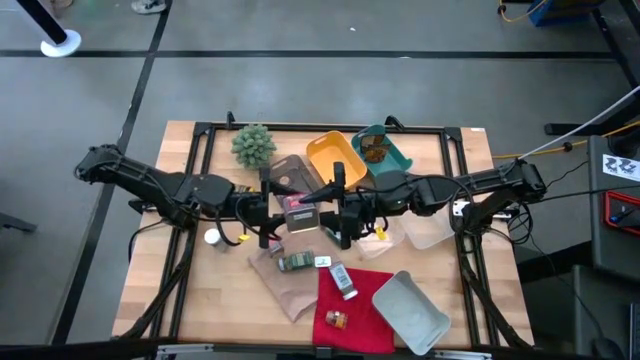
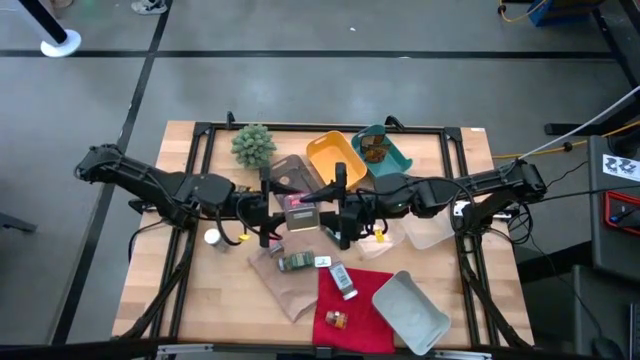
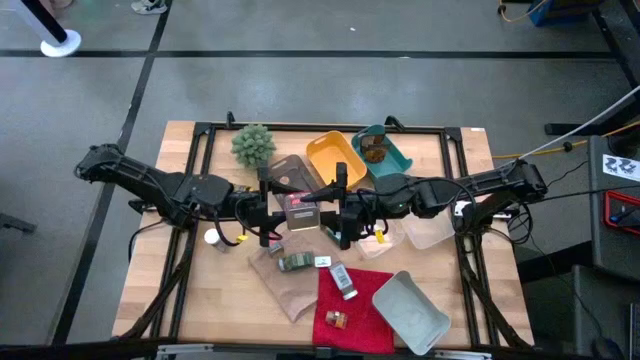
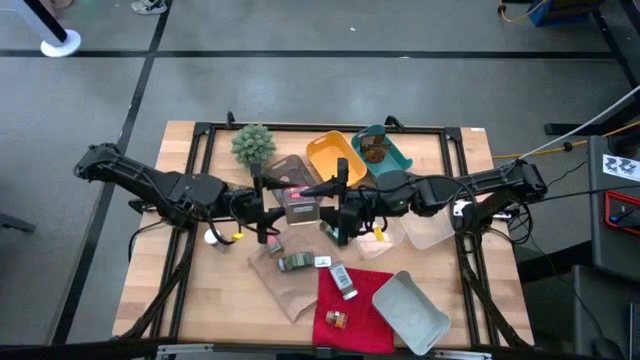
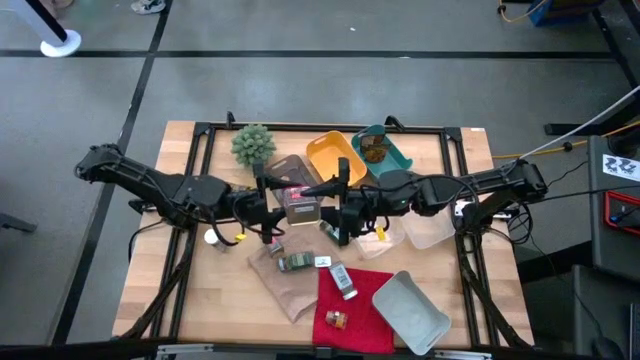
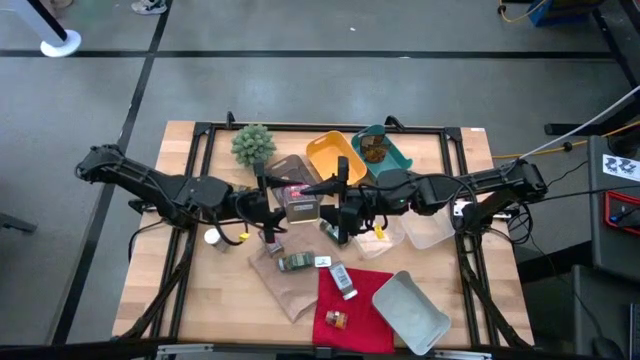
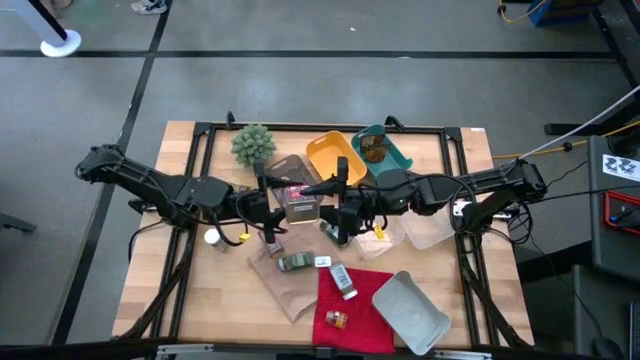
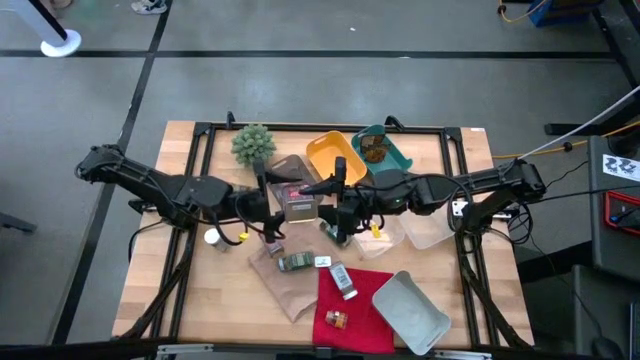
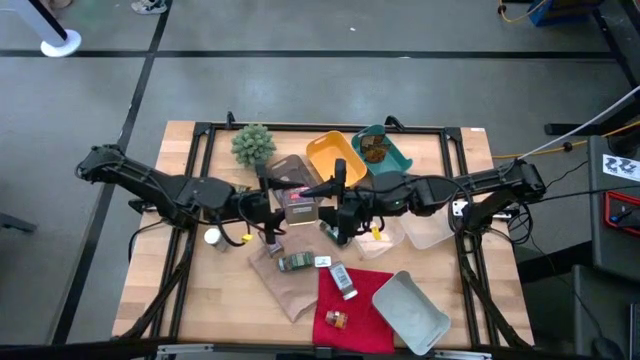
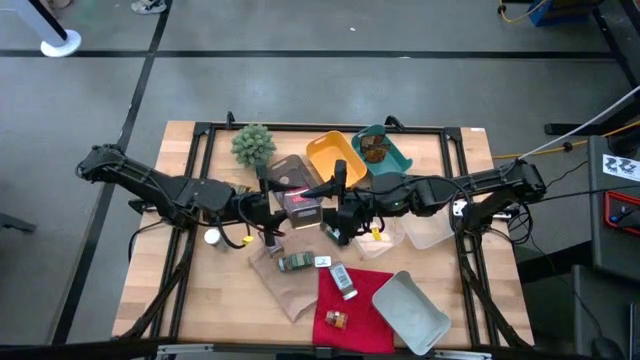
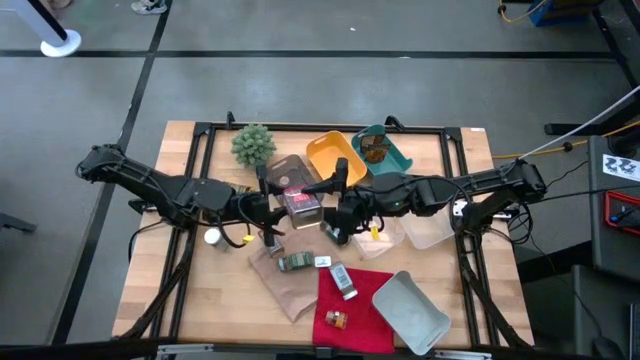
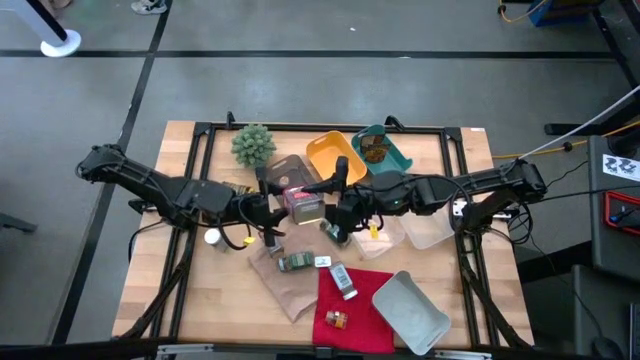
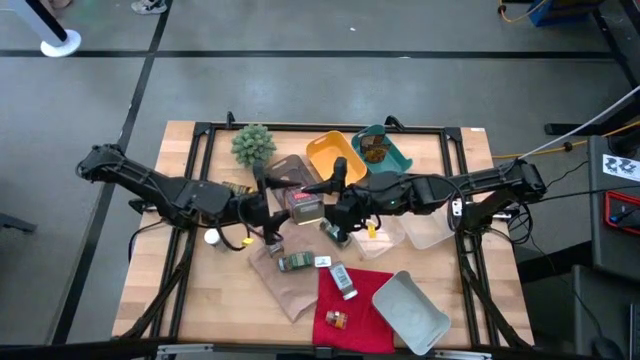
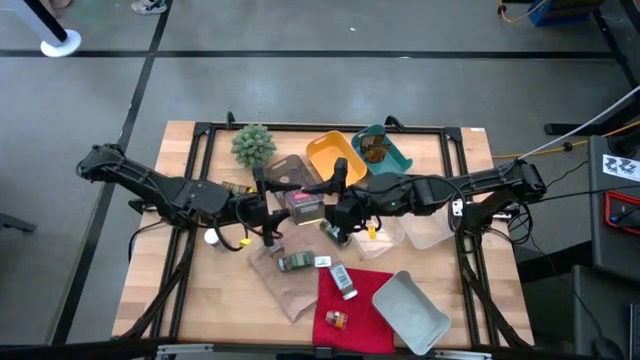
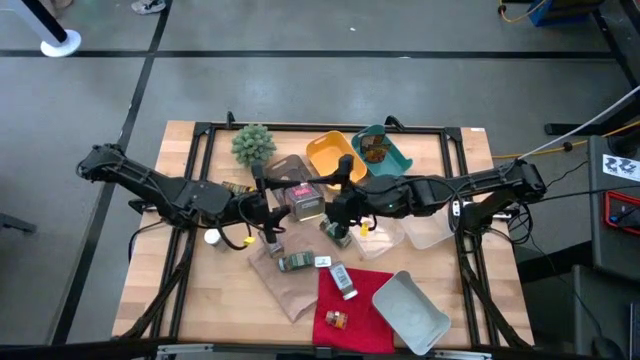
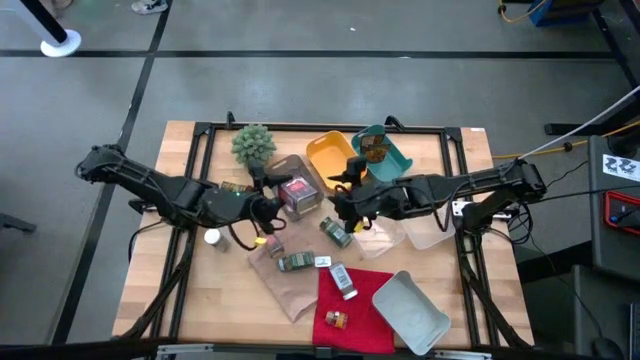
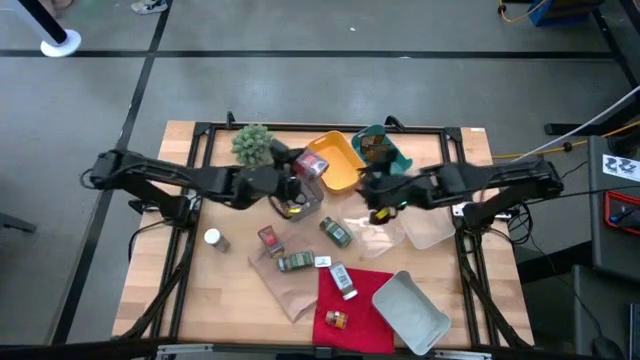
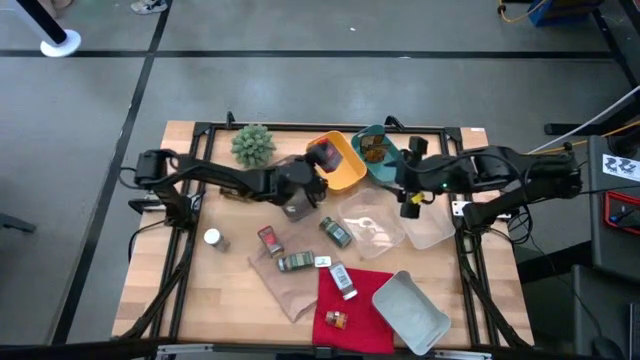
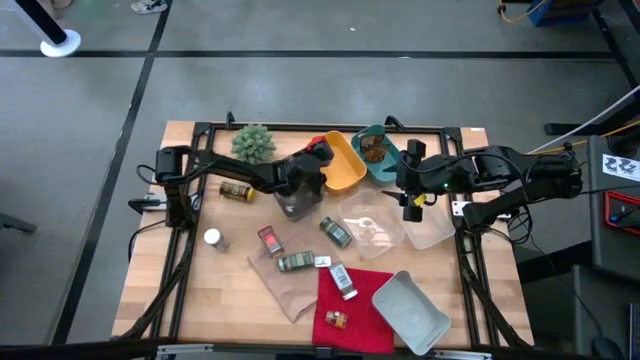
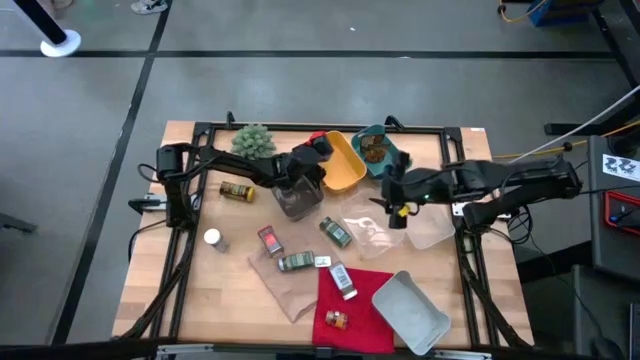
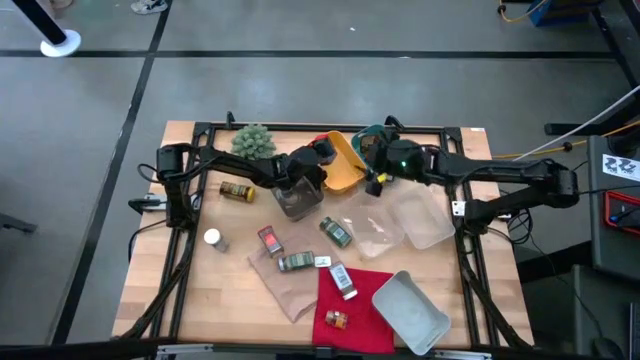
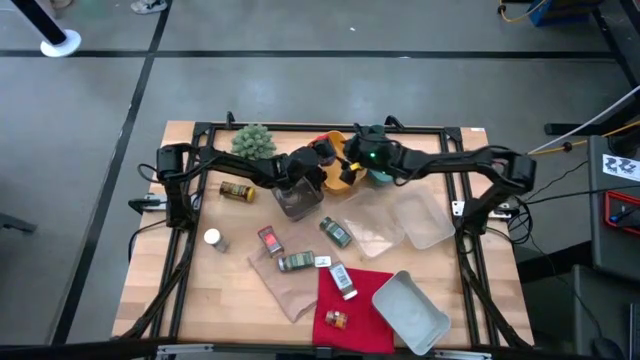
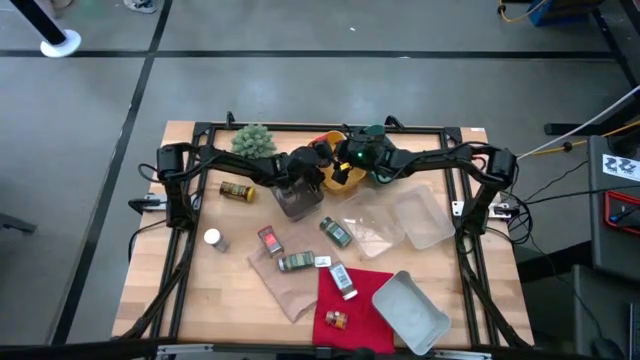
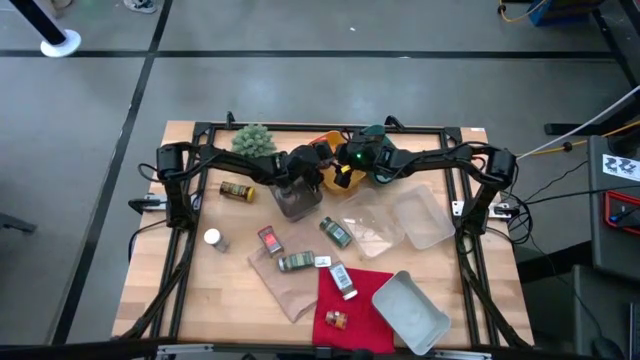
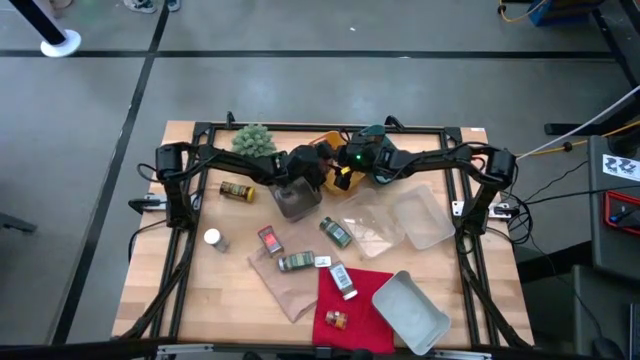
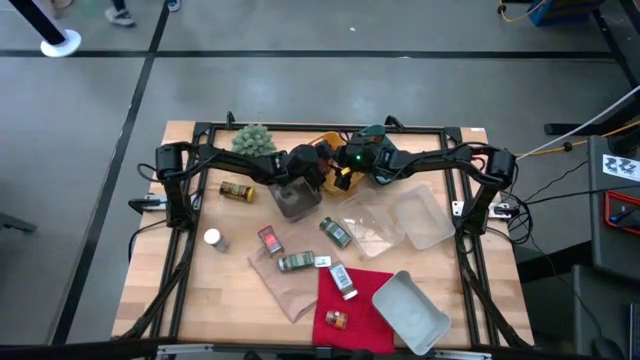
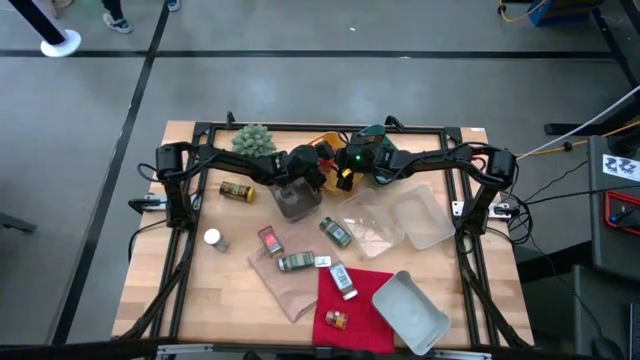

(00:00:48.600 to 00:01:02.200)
Task: Sort spices by type
Put the right red seasoning can into the yellow bin

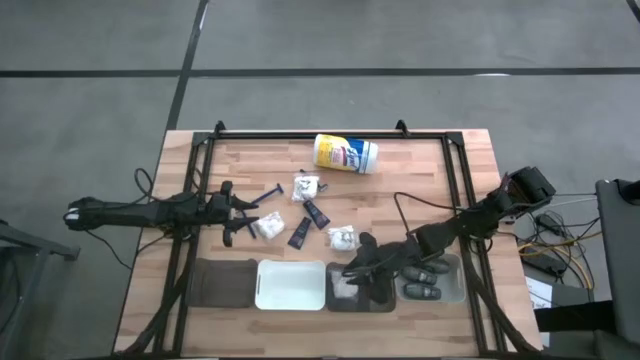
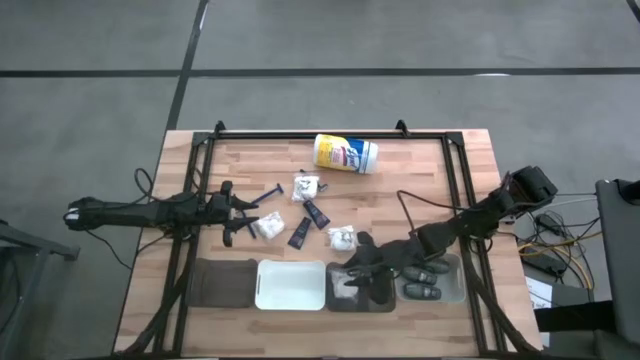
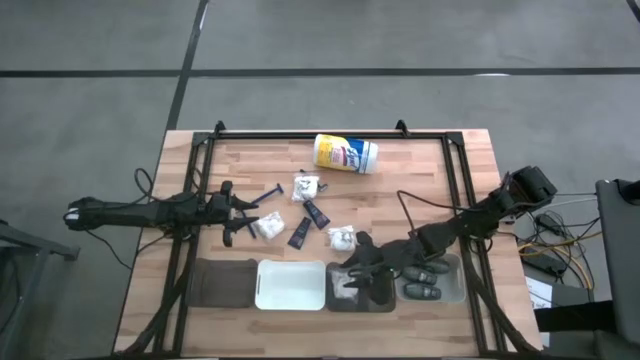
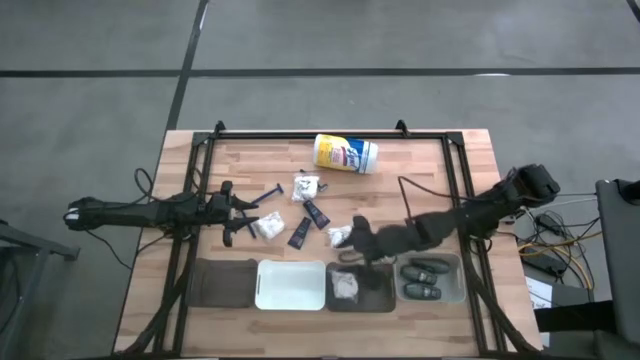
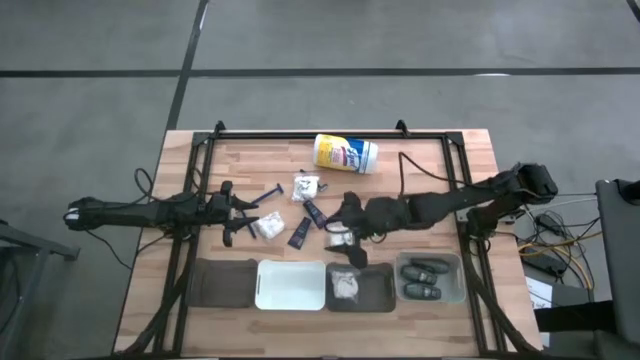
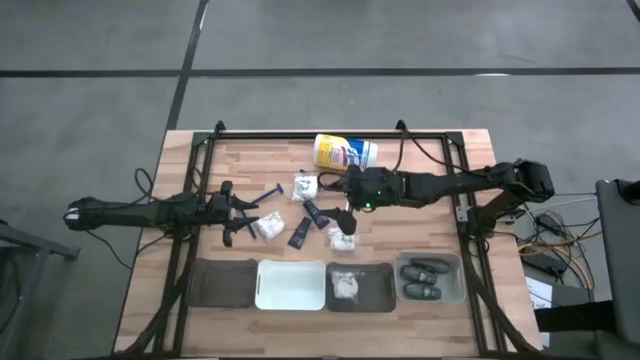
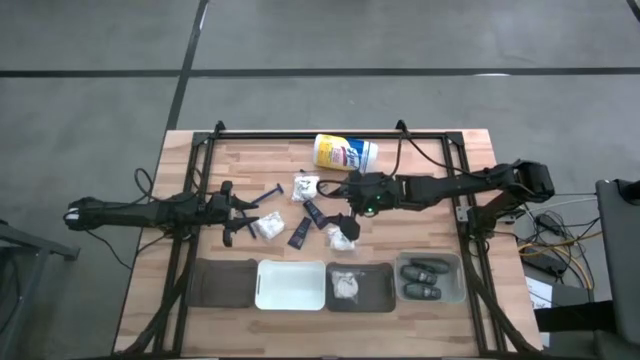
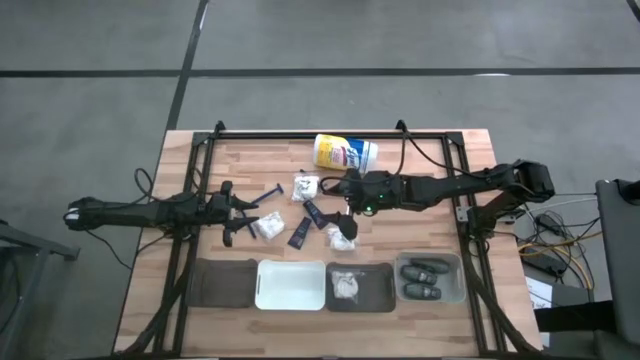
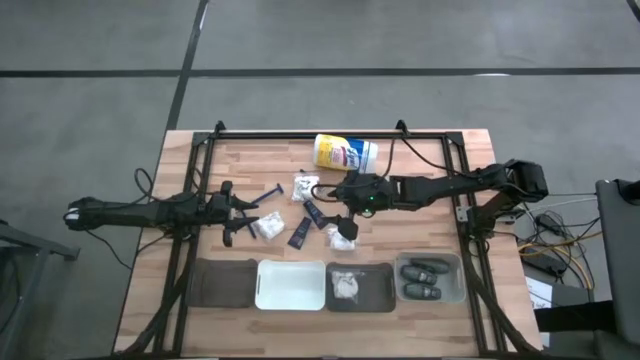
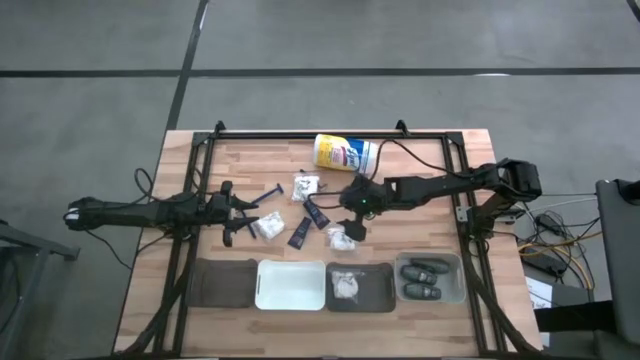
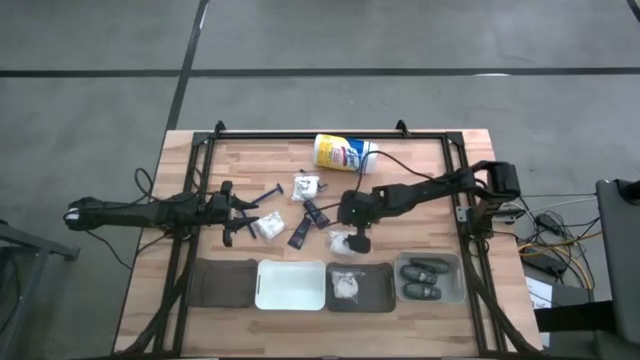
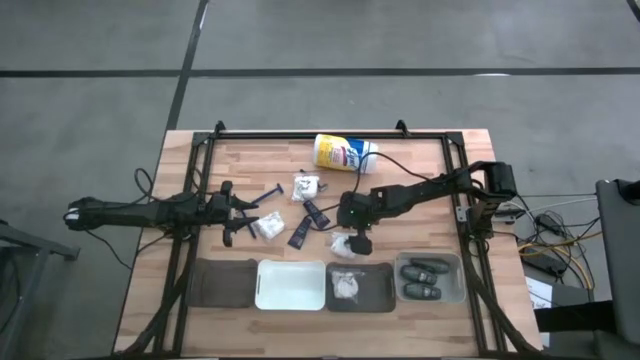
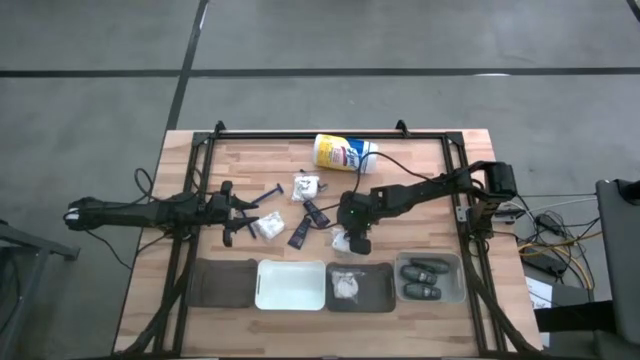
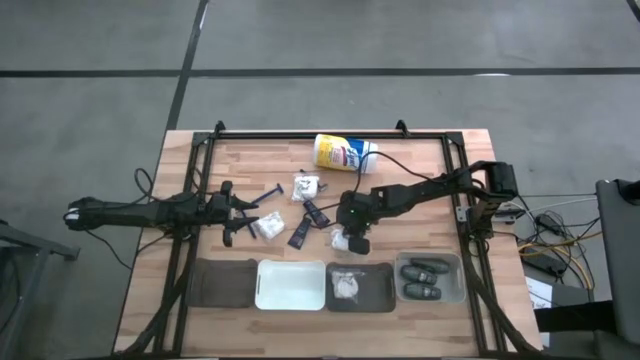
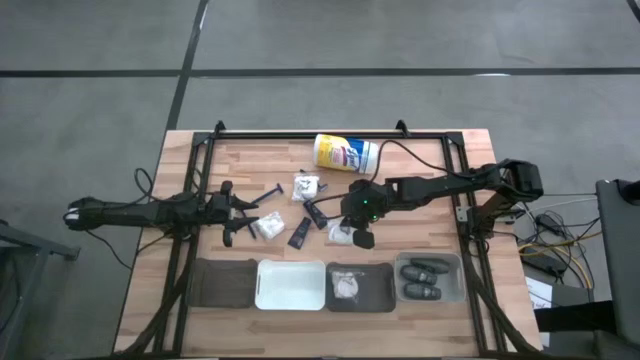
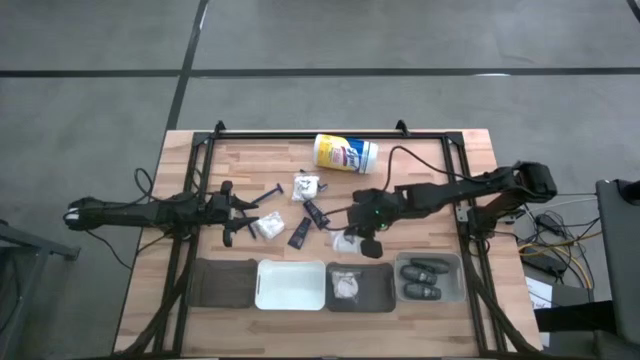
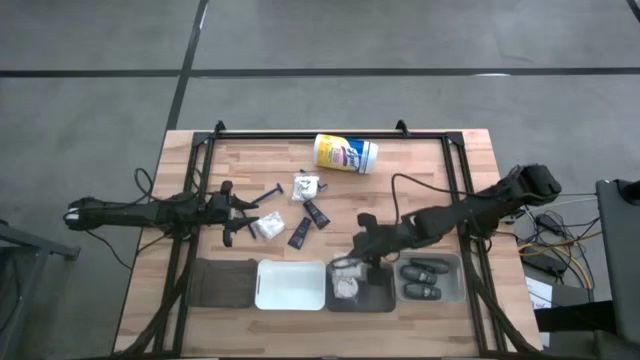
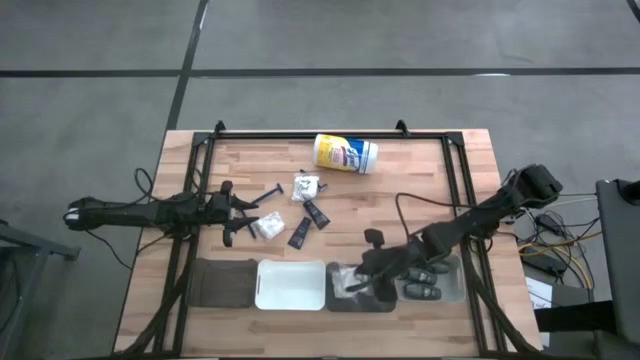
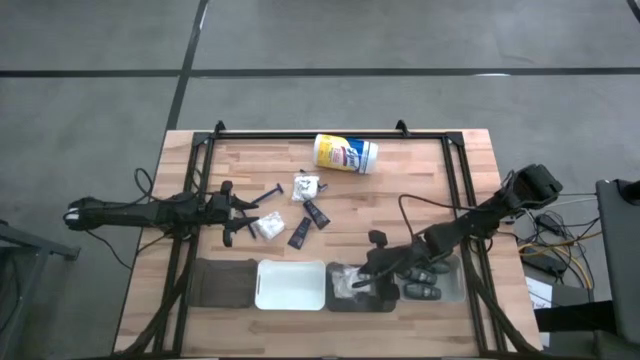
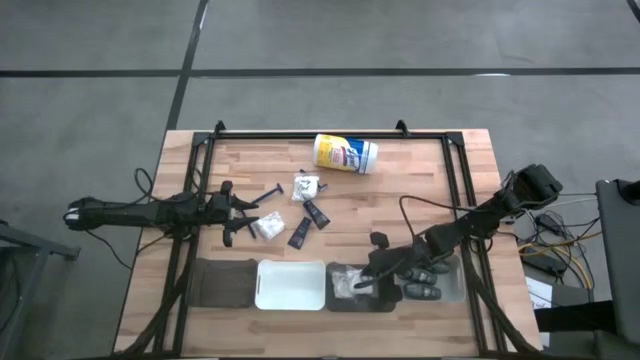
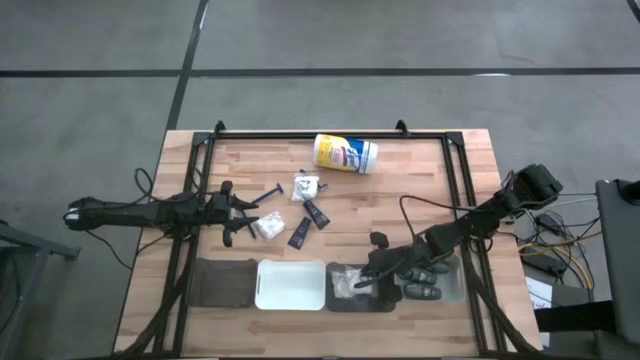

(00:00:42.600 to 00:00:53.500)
Task: Pick & Place Travel size toiletries
Put the cotton pack into the right black bin
